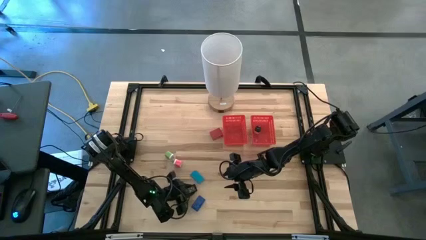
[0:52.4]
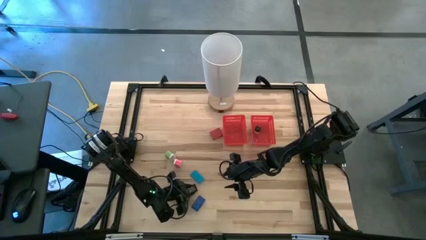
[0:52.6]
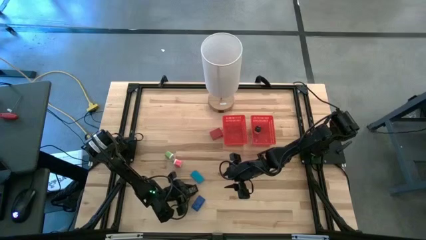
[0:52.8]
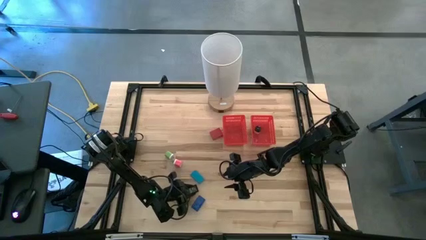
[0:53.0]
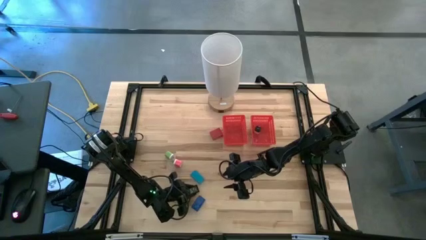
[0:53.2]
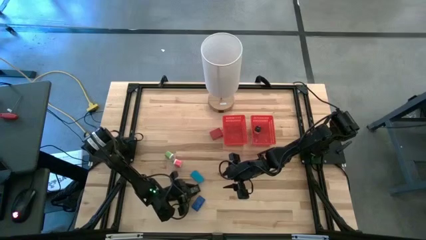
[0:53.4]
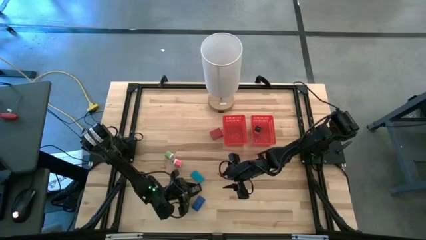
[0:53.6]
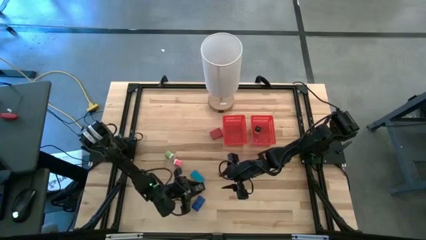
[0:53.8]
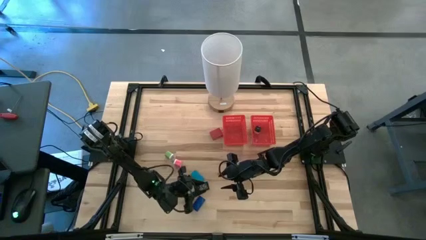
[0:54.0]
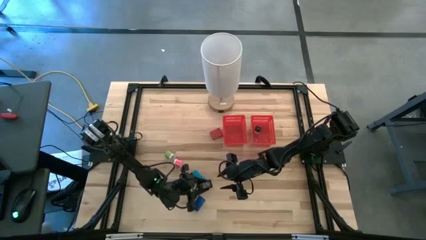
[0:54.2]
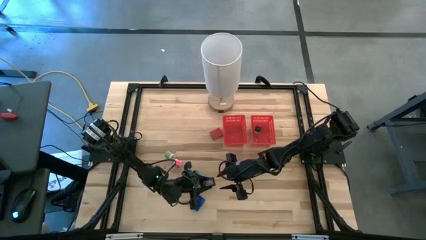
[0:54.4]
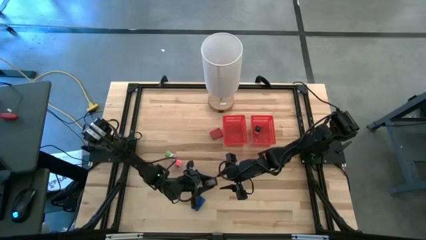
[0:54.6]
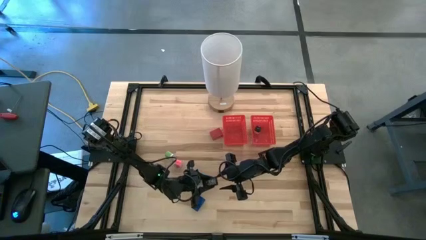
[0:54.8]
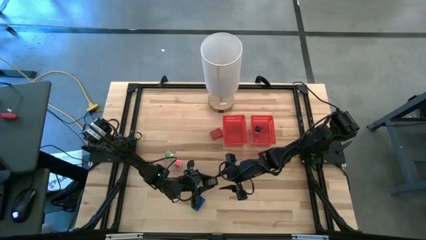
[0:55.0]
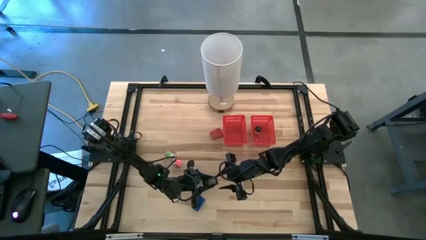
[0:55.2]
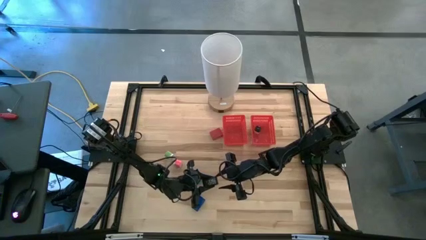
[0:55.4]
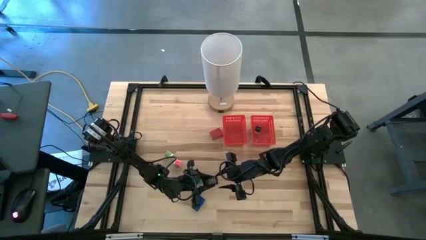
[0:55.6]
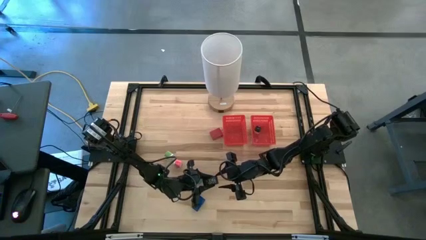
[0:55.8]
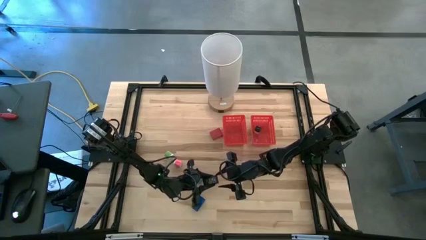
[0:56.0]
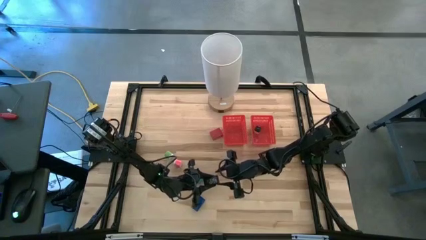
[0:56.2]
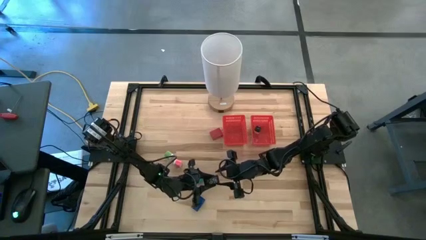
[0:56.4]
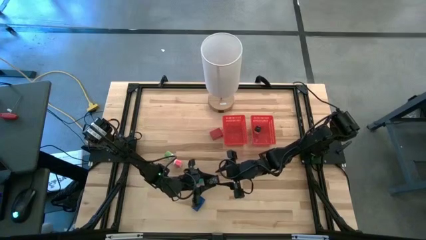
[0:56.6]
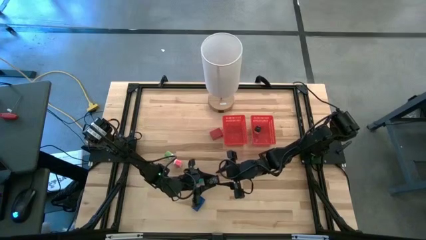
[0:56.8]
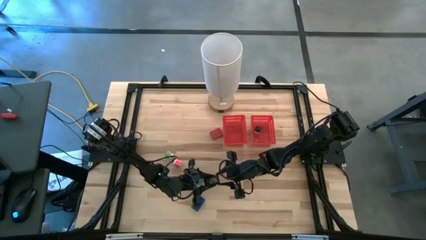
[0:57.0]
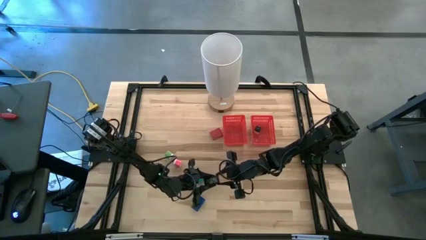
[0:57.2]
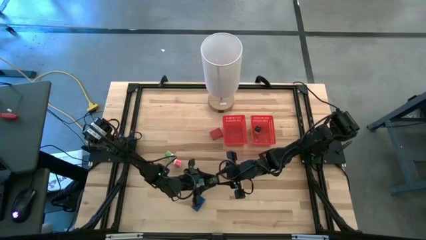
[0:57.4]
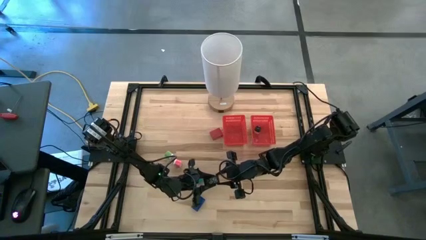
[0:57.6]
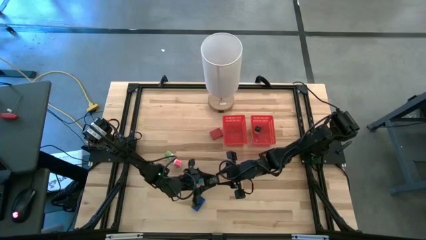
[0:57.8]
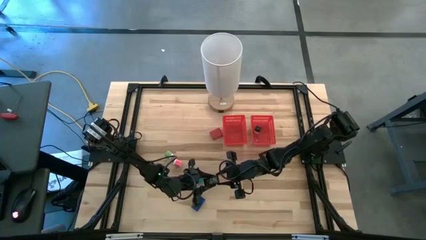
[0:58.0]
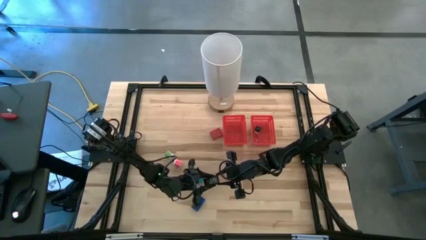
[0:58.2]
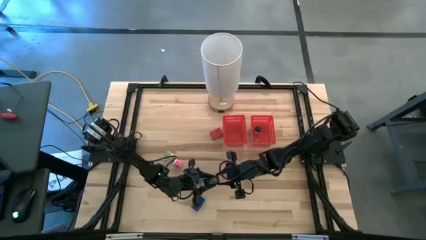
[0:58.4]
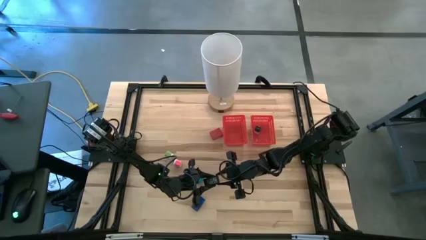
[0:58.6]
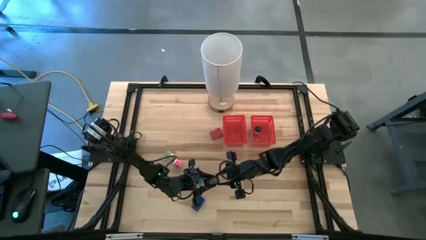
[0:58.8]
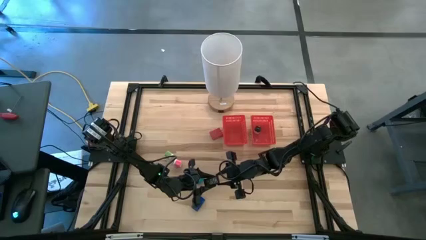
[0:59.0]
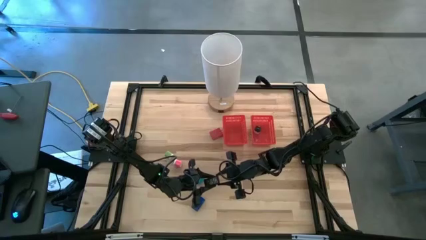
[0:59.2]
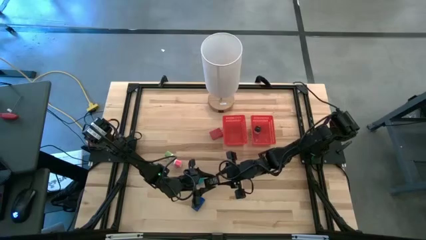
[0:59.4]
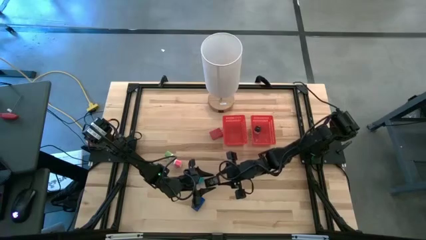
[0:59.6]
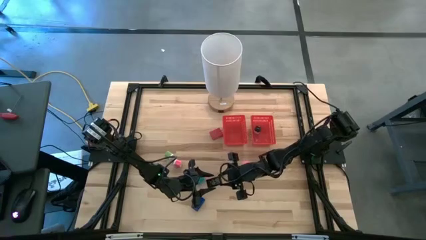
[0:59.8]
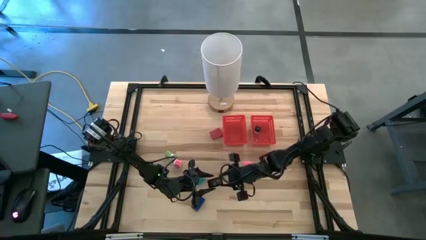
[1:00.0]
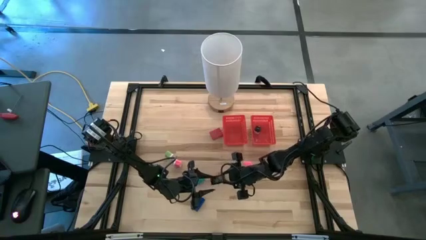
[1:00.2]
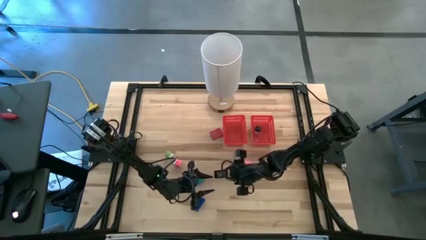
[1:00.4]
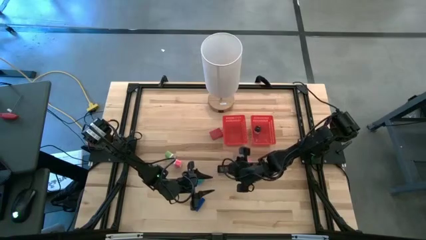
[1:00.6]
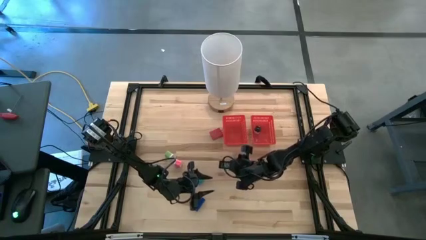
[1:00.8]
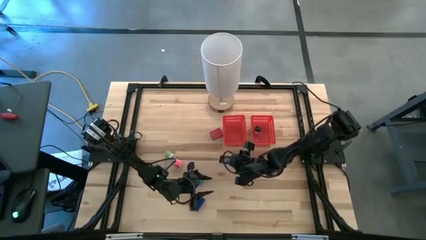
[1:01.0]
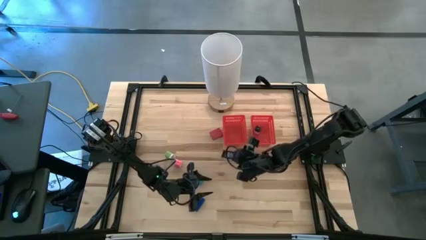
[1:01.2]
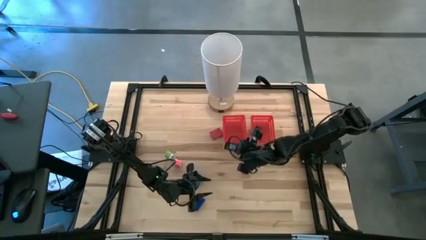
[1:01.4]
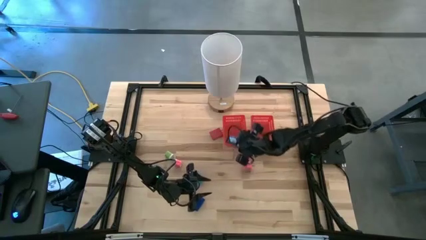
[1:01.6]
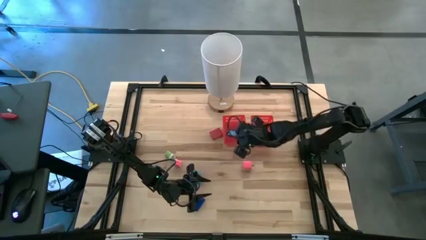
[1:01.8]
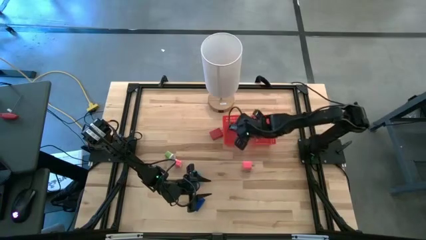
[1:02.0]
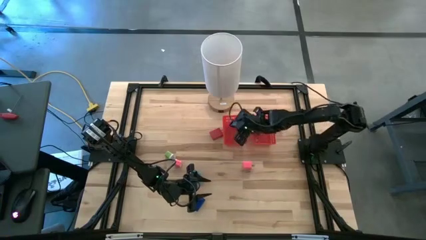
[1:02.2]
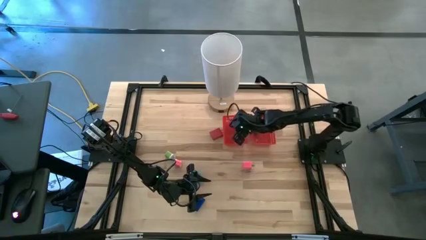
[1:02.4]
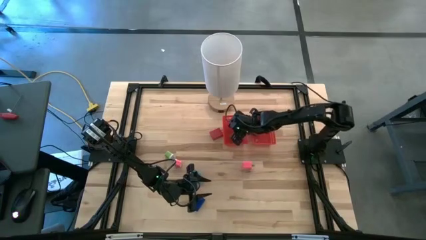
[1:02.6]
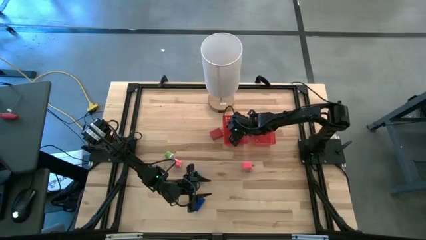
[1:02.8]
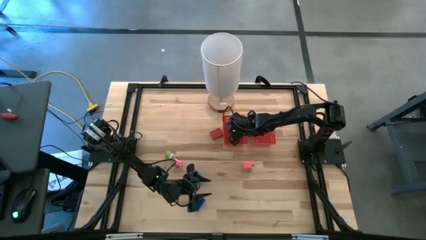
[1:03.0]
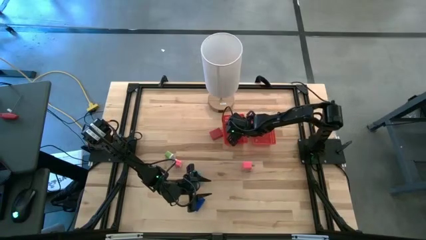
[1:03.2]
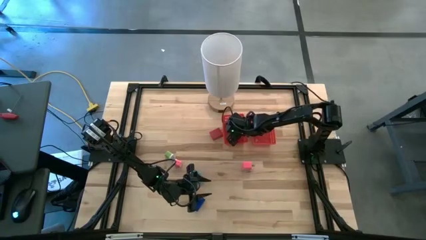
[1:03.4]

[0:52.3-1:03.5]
Task: Pick & Place Office items
Put the black timer into the left red bin

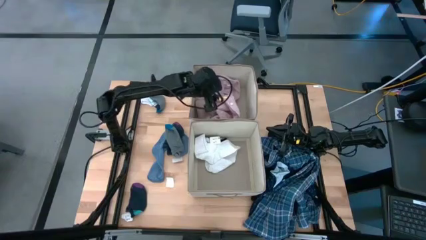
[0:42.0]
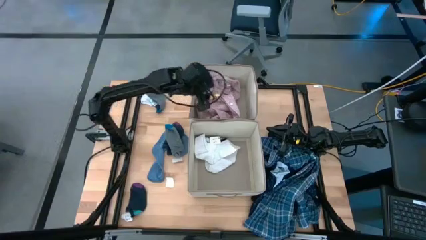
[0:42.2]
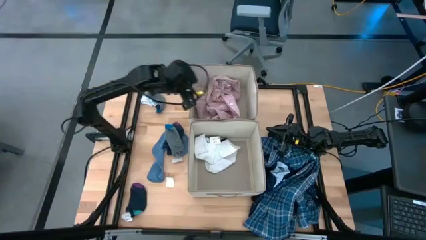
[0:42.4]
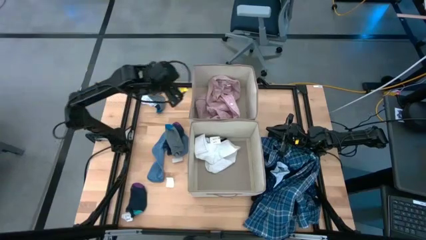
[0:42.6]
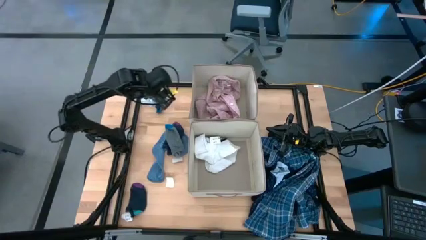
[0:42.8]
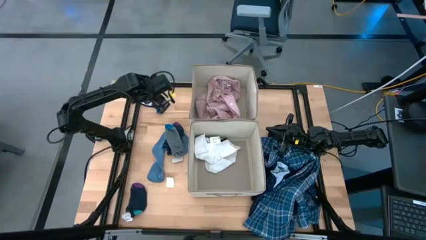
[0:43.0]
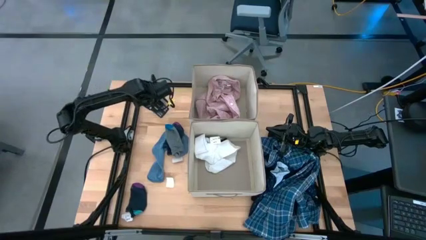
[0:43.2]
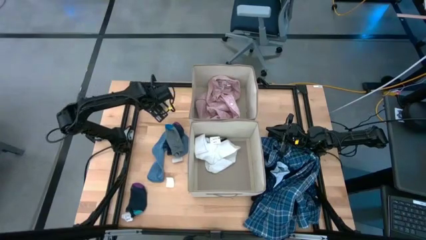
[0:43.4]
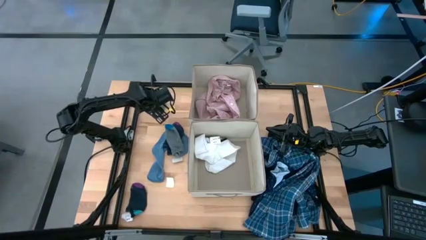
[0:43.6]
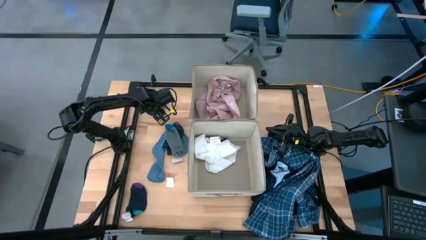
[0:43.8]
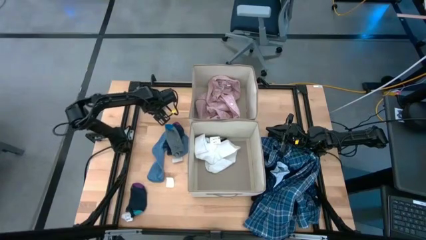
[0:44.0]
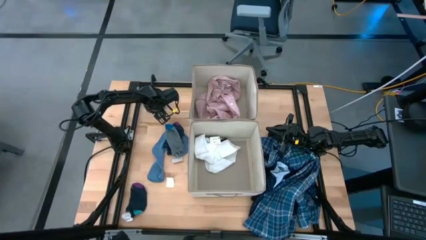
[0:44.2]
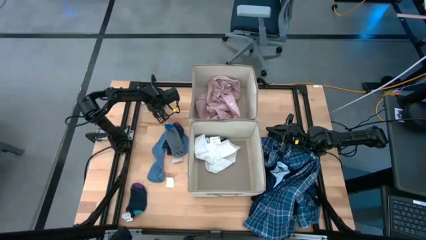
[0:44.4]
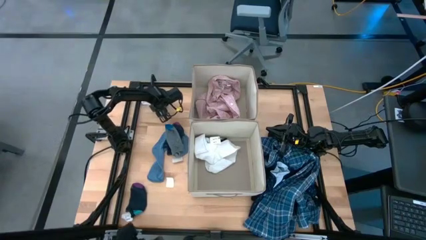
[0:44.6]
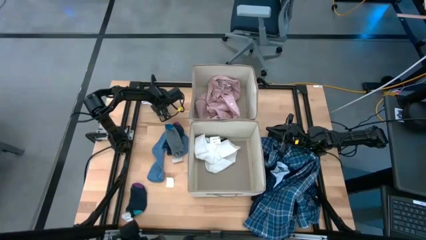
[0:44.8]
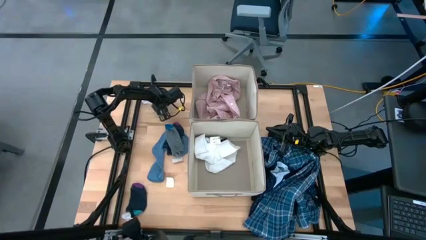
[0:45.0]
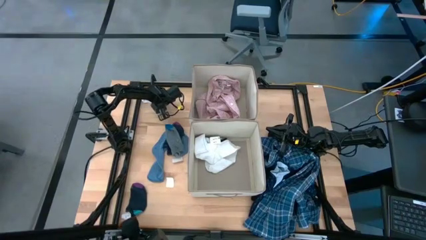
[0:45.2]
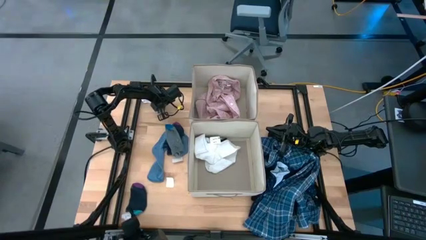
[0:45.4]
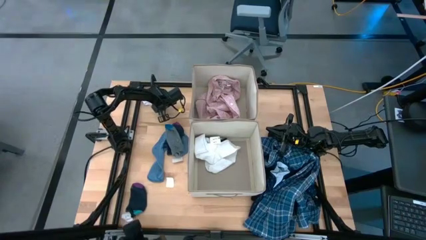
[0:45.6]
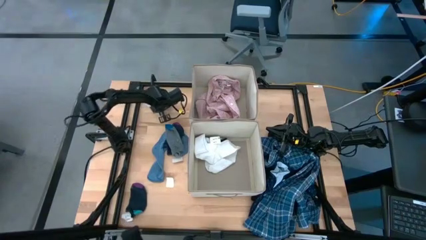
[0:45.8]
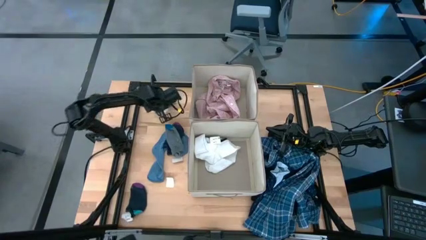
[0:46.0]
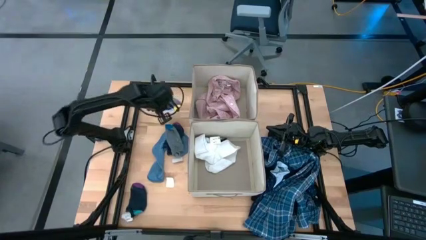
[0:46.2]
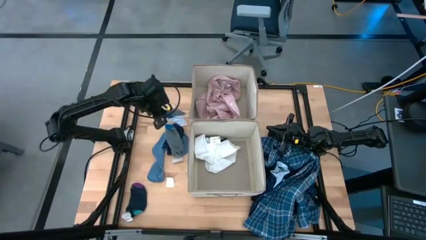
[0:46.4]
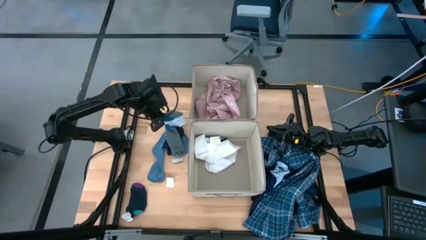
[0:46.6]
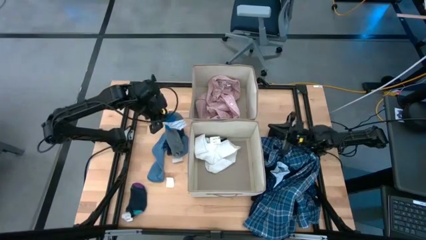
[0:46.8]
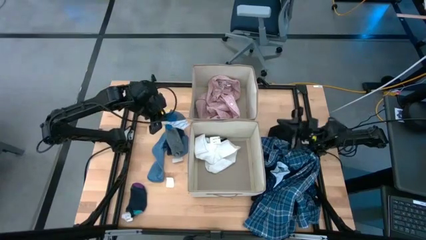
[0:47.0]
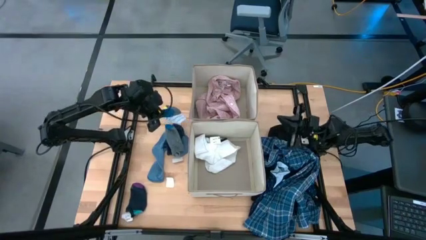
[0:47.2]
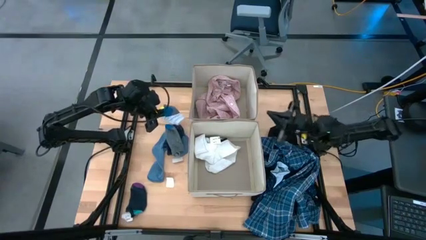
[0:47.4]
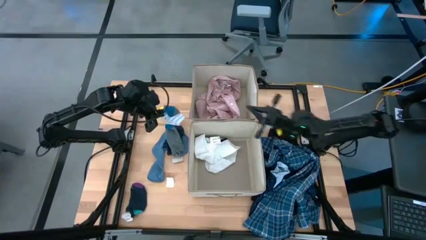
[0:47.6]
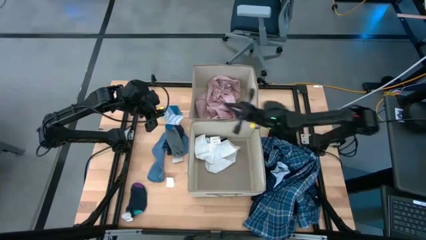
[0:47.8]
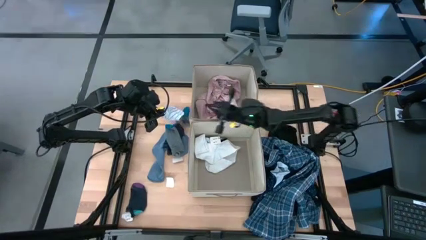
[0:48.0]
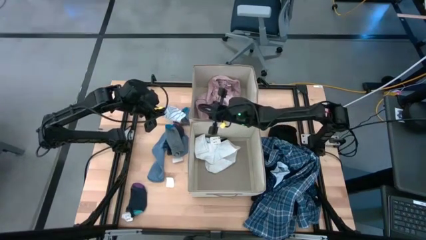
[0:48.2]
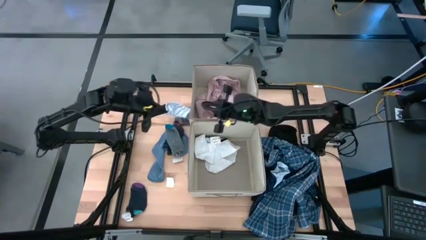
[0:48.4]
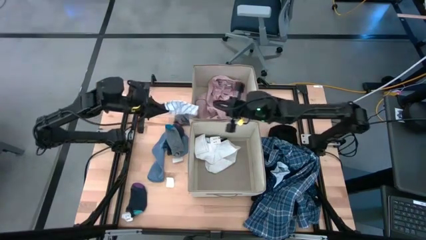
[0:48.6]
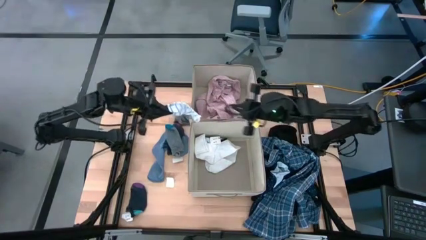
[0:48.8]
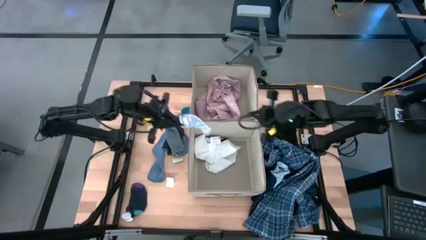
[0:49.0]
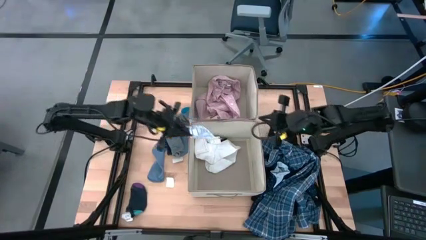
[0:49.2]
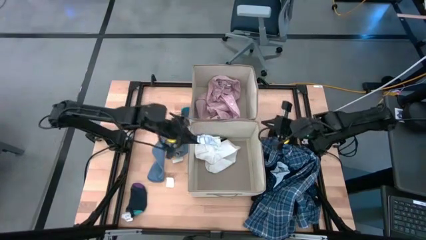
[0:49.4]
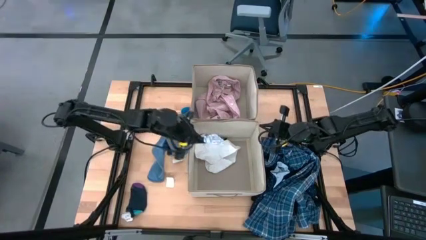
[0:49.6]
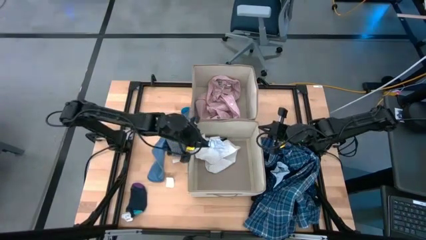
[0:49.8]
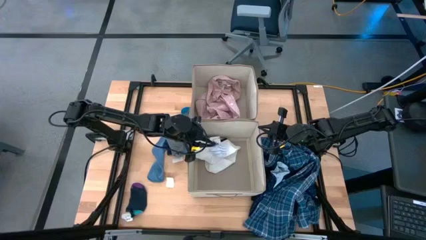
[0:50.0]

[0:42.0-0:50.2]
Task: Sort clothes
Put the white patterned sock into the bottom laundry organizer
